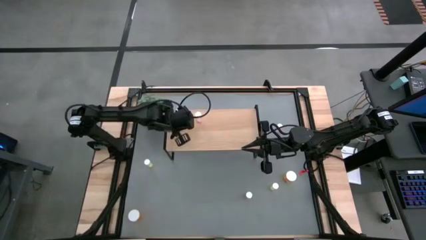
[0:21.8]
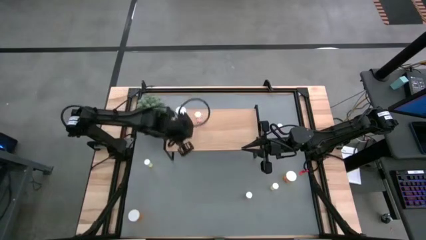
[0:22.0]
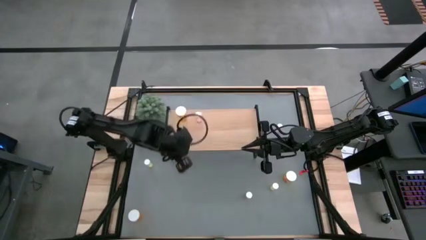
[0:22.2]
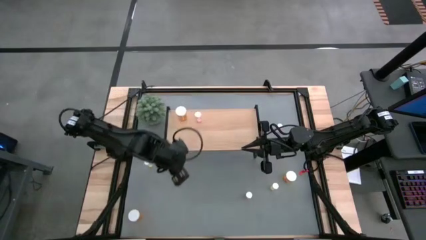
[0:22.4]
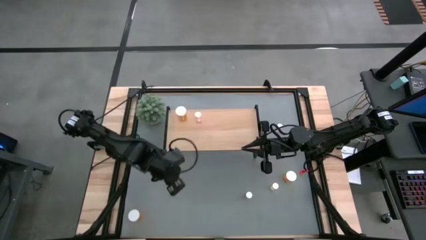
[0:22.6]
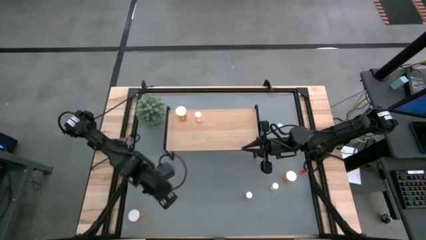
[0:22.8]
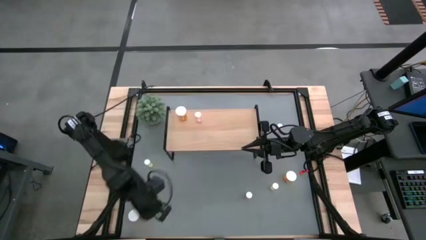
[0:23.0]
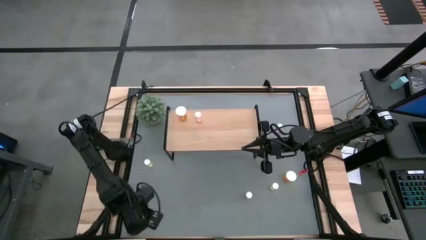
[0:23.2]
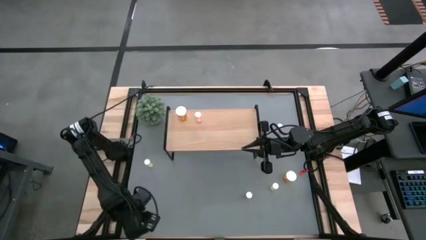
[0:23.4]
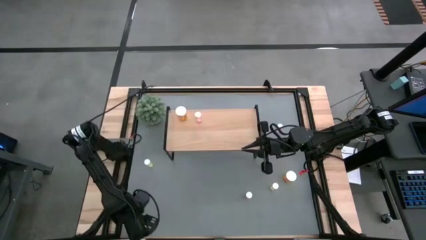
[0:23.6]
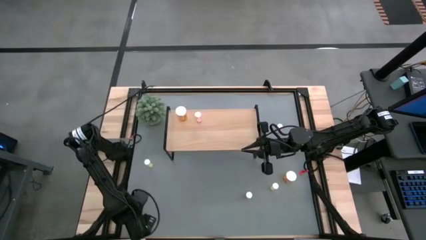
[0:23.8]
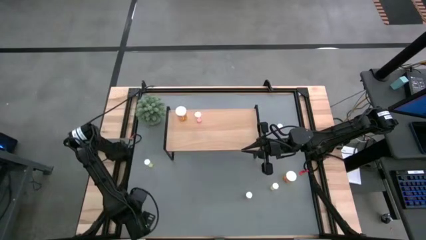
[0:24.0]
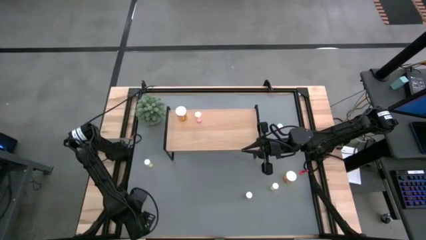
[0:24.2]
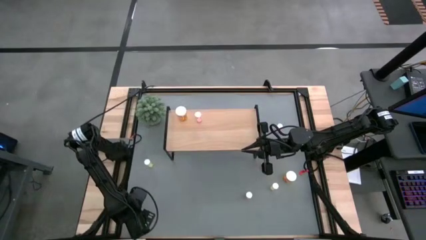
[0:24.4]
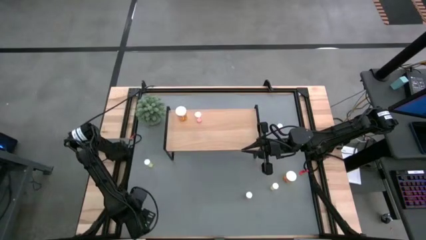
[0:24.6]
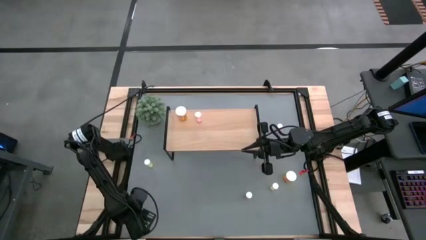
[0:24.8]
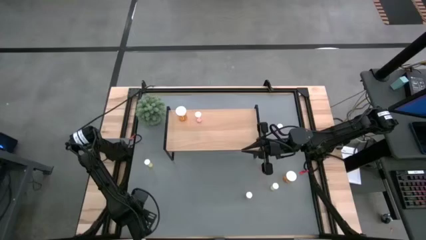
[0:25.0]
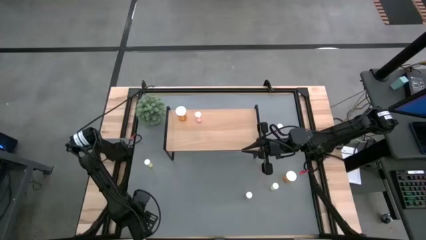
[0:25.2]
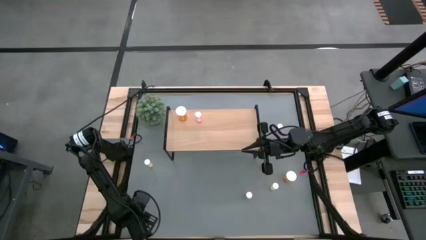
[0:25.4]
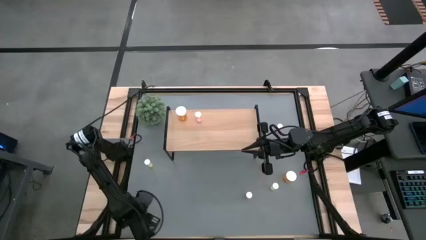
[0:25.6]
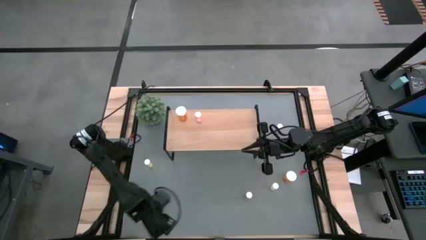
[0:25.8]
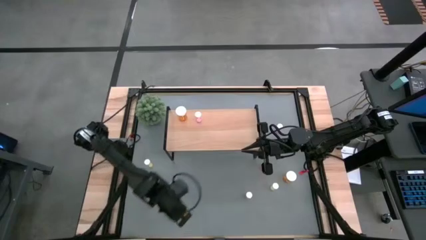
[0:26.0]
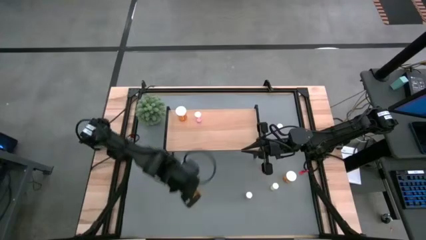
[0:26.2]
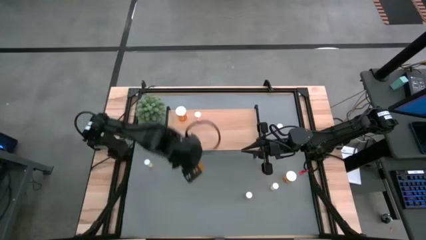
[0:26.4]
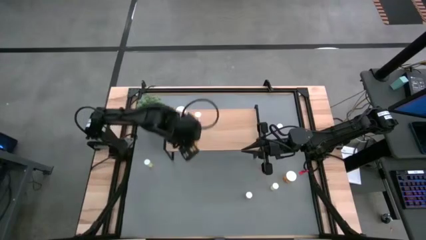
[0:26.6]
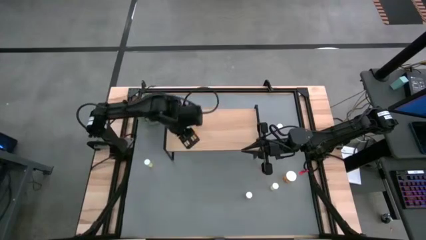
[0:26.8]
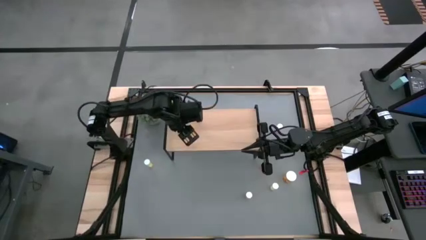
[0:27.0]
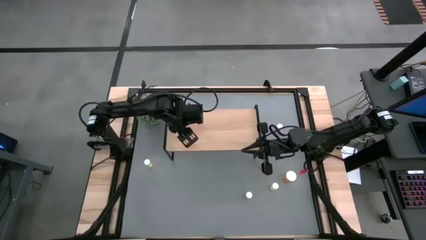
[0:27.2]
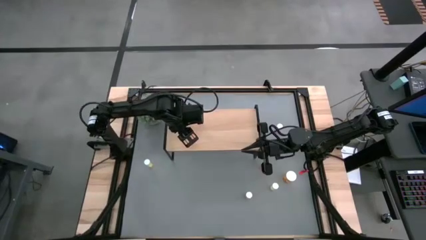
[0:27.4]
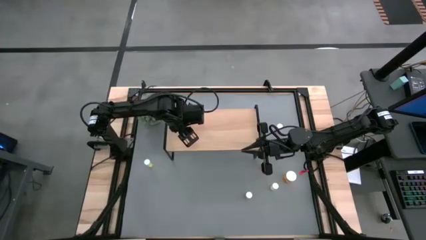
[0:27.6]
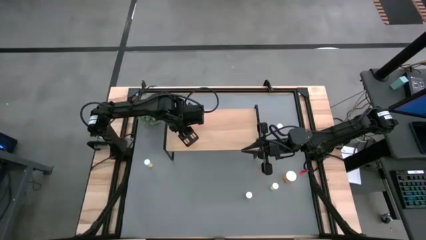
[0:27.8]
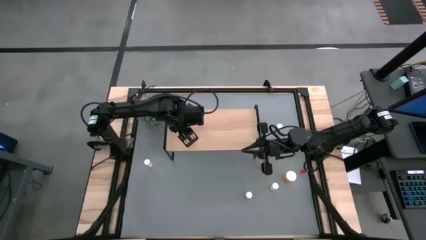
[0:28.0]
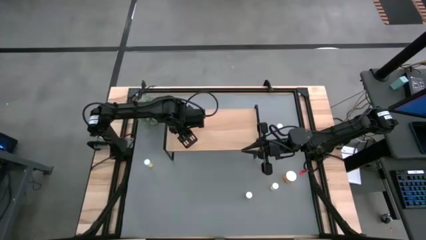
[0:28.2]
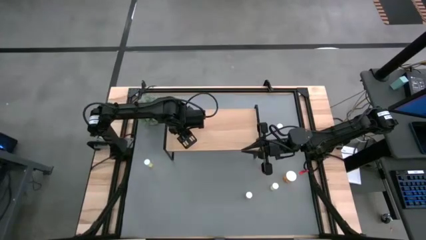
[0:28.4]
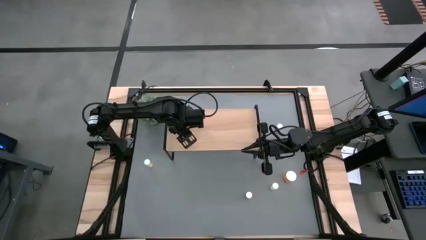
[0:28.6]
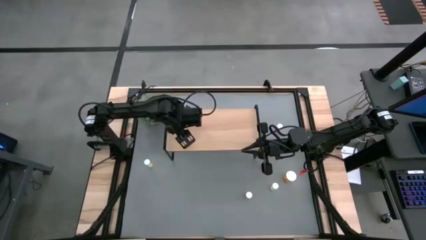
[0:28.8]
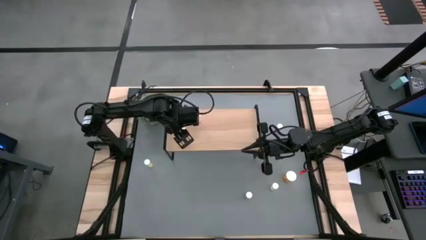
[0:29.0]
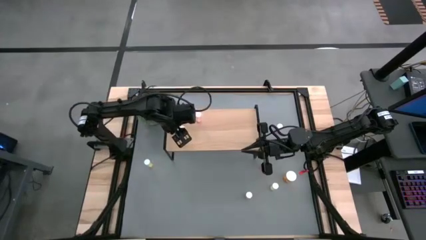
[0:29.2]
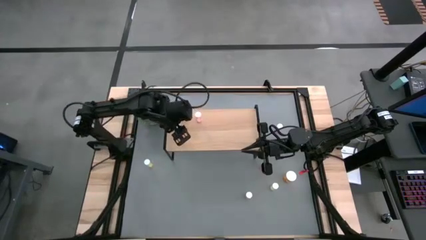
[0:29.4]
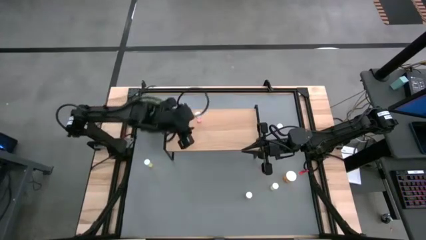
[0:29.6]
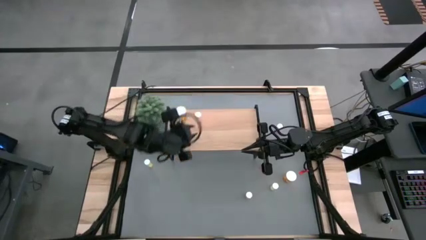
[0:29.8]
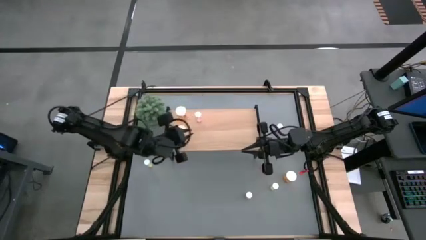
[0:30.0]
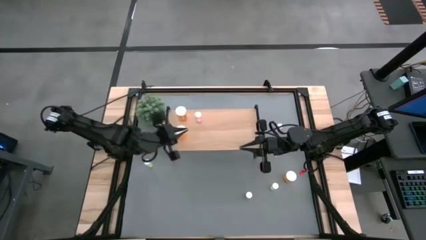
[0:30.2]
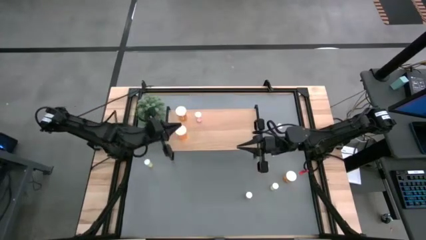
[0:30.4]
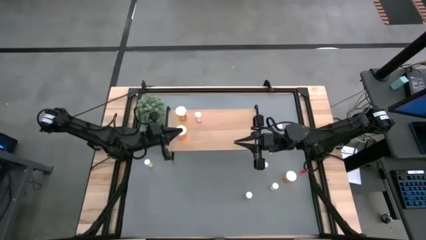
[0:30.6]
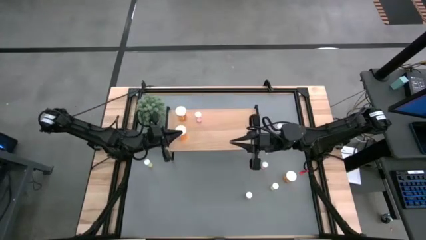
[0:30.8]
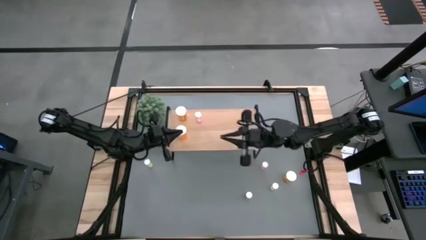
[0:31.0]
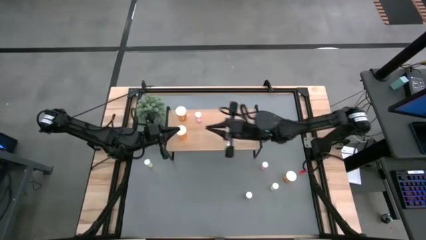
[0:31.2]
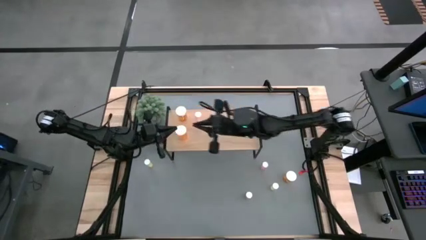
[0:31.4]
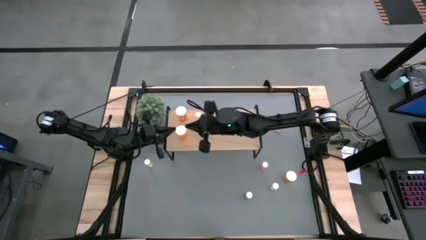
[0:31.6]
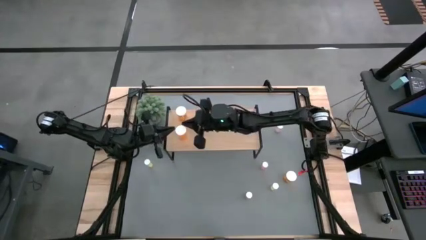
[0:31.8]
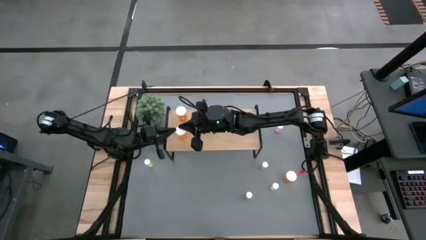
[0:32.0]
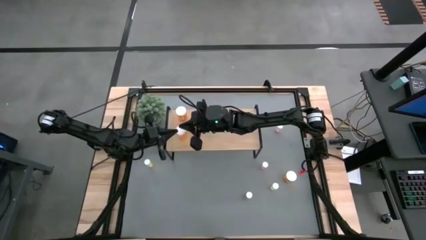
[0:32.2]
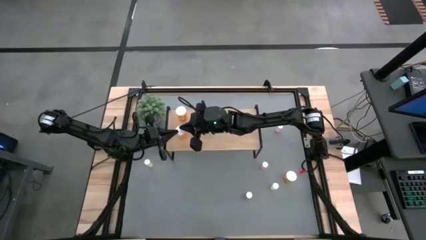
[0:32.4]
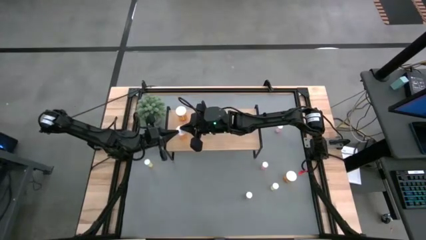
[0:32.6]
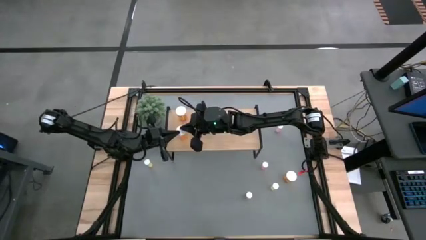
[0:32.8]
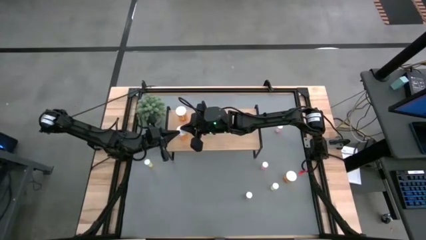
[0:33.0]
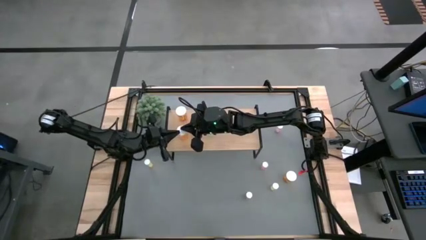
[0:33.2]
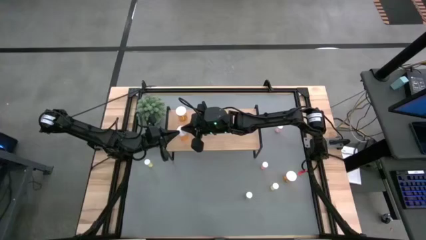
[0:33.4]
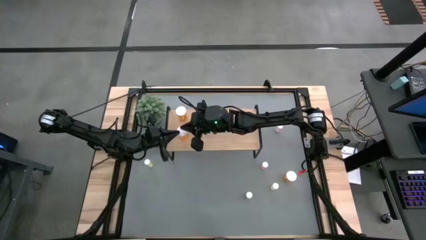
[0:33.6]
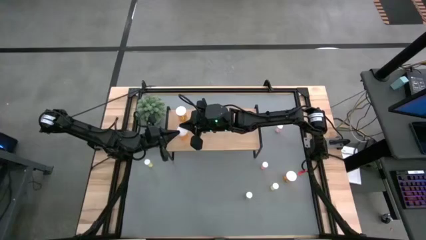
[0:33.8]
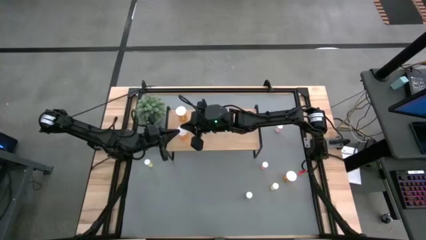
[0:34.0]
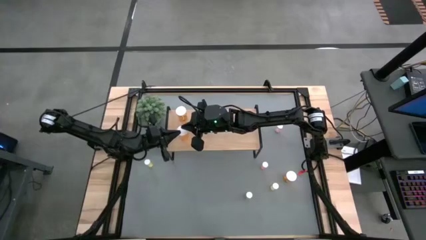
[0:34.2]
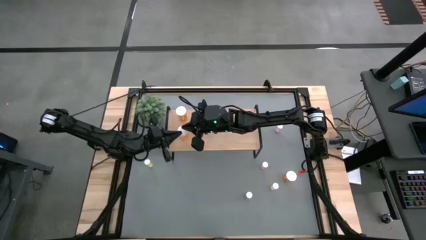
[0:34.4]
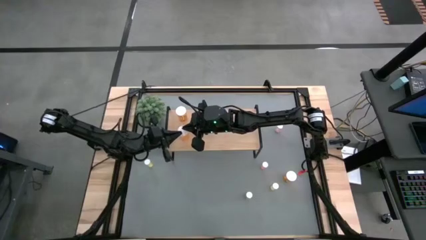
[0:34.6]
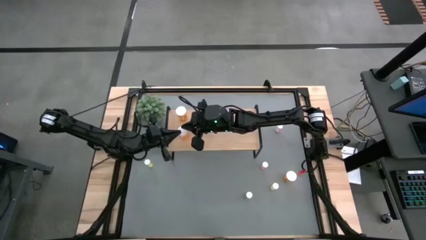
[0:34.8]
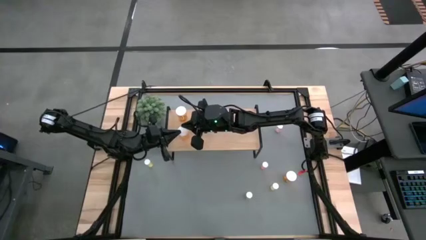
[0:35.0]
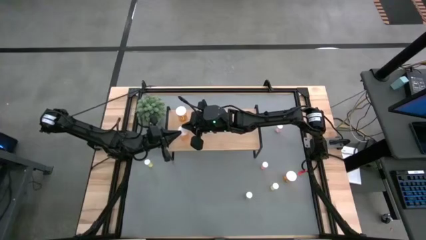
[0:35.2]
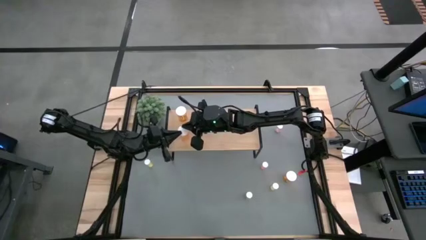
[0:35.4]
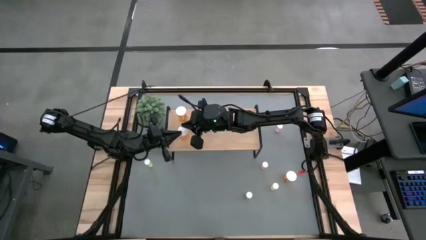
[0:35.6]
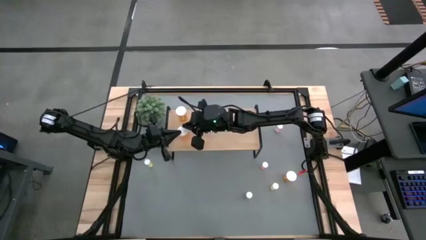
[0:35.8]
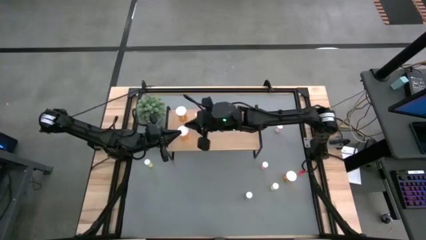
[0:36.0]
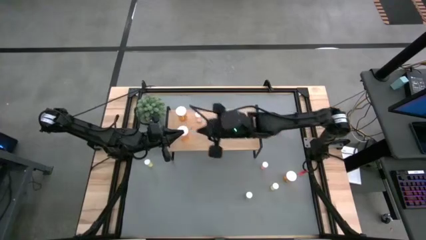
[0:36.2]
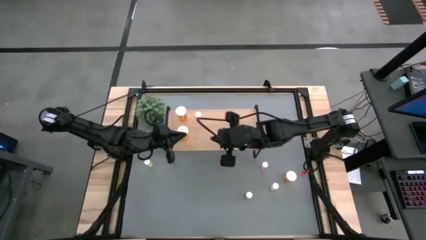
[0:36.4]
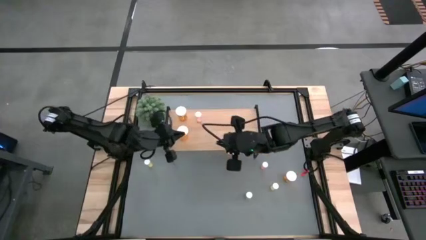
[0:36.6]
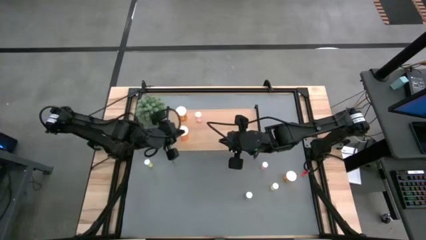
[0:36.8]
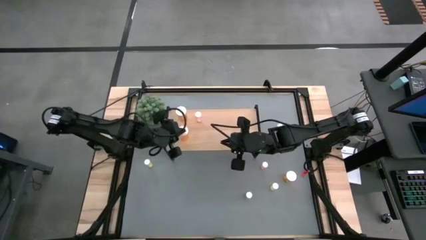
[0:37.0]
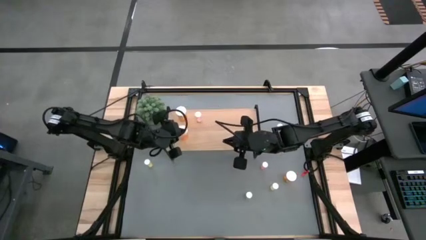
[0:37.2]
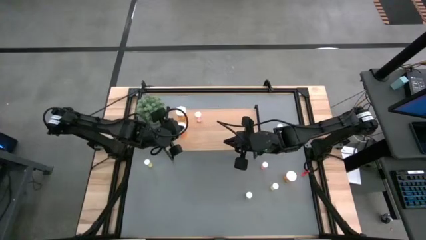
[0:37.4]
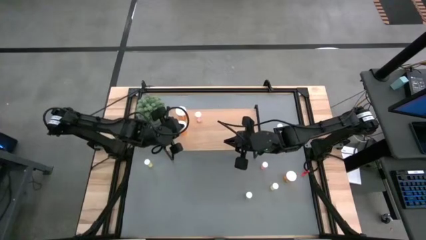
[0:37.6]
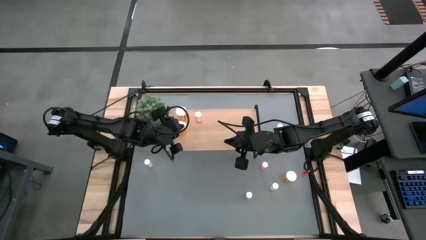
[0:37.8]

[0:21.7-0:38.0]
Task: Pick and place medicine bottles onto shelf by color
Put the bottom orange pill bottle on the shelf aligned with the other orange pill bottle
